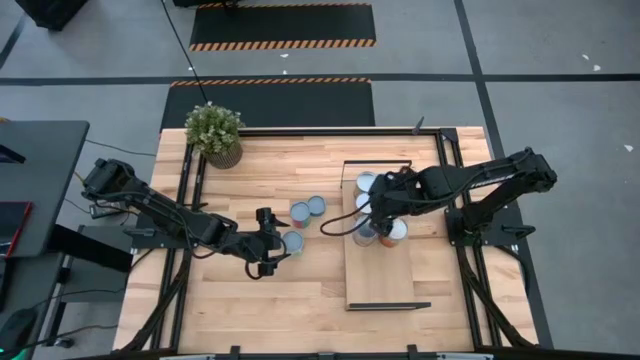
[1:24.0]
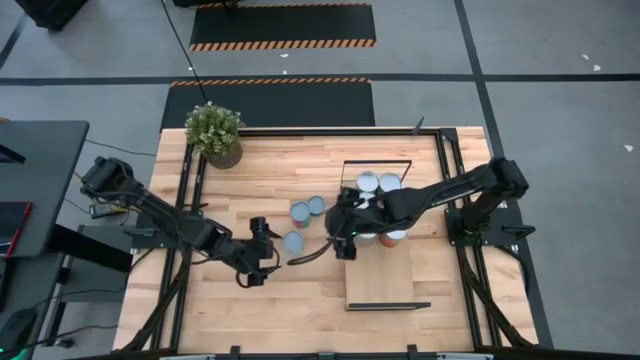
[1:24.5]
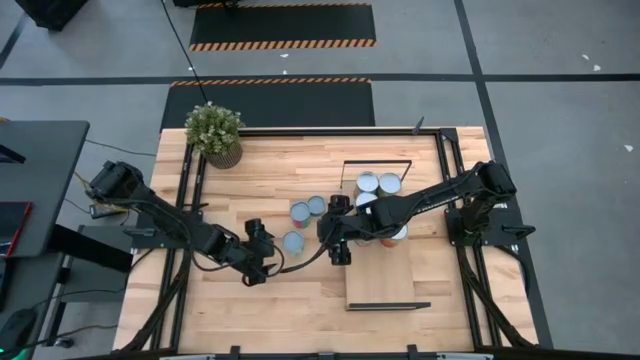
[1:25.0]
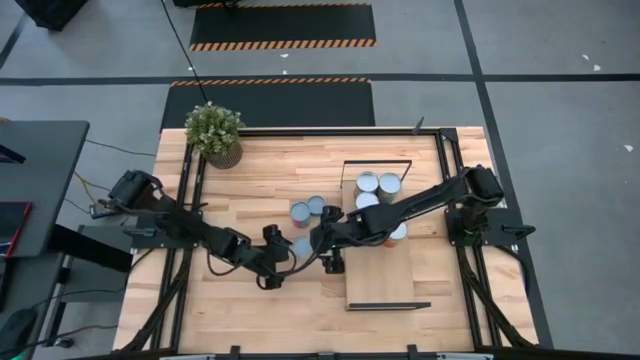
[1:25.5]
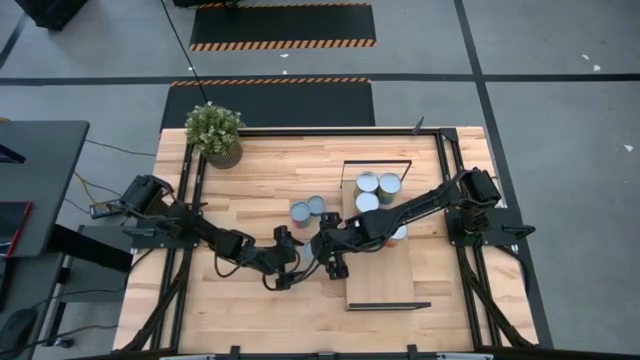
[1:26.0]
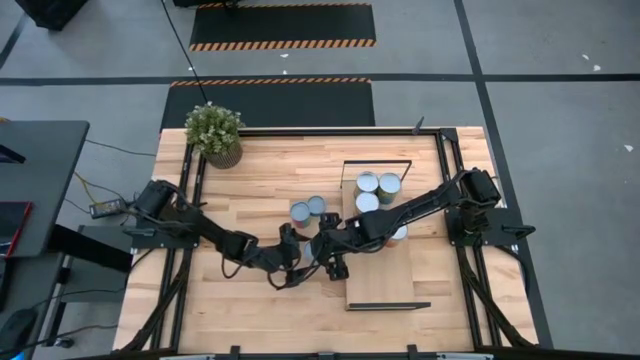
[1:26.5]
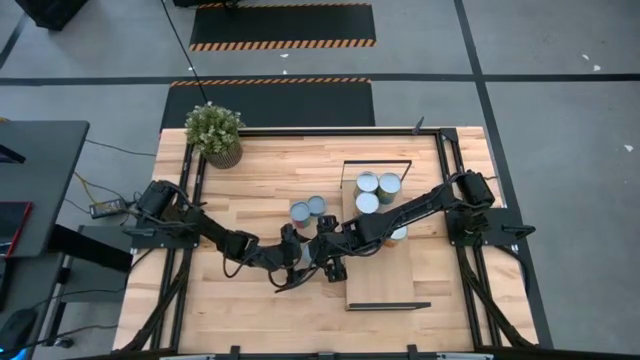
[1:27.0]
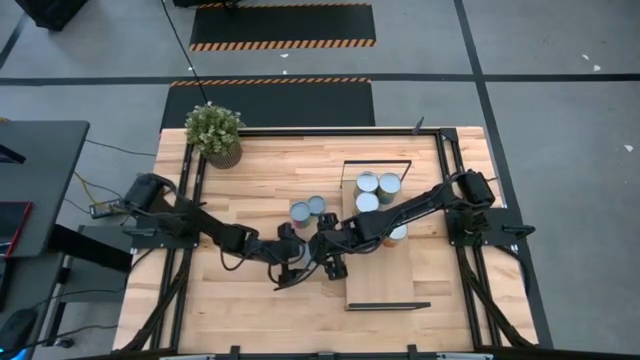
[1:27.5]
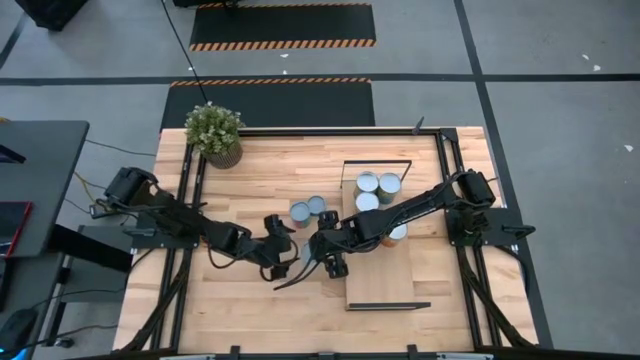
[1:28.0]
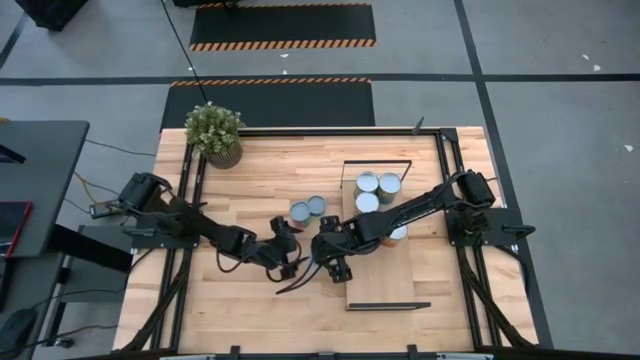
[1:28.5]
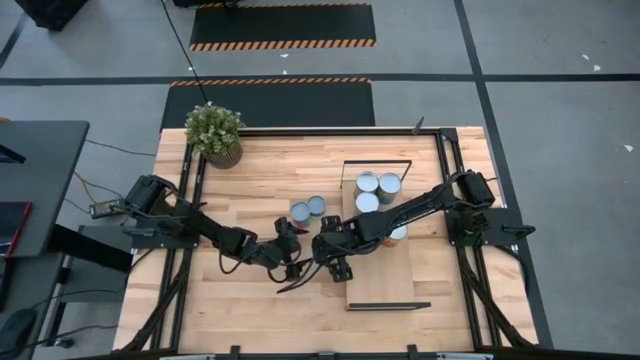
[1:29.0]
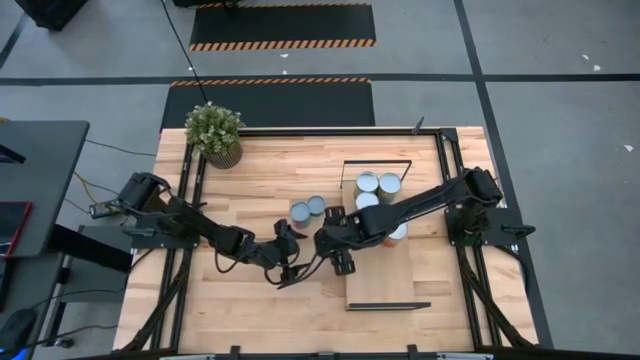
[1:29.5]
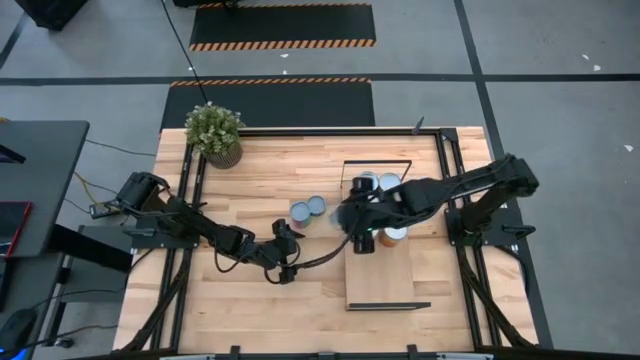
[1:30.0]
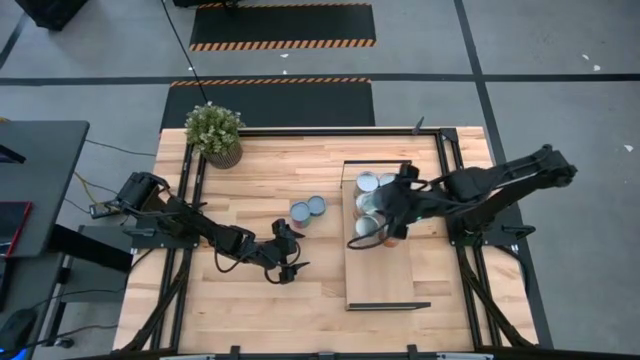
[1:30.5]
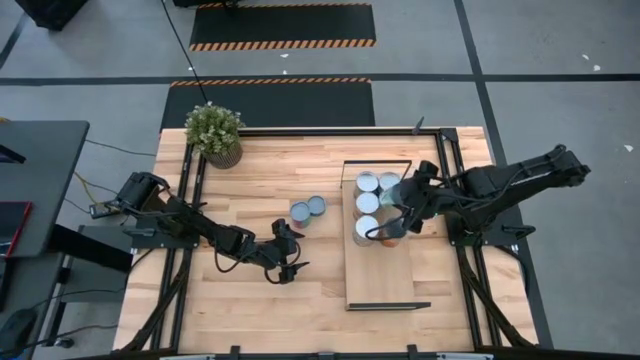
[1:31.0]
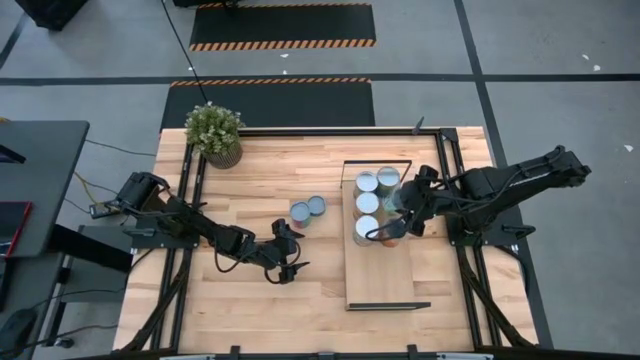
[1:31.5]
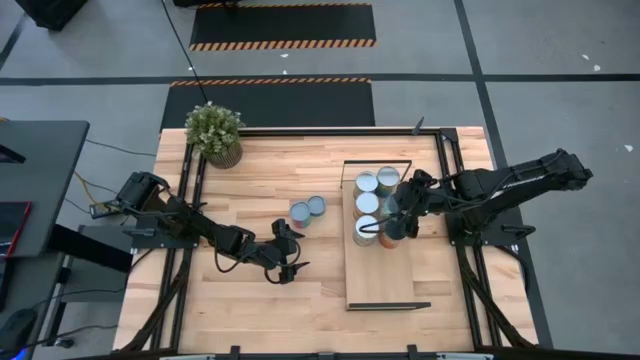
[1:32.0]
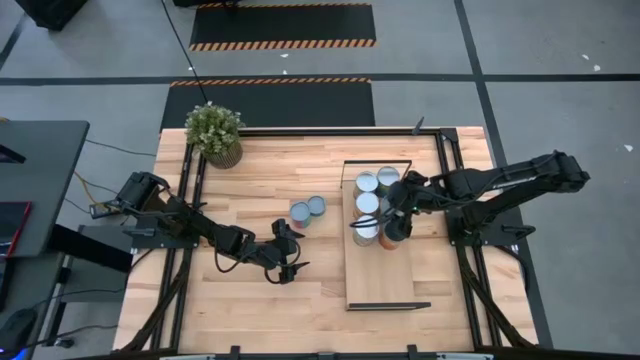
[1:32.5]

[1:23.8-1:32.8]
Task: Pick and place cans onto a shelf
Put the canned mixed fruits on the shelf

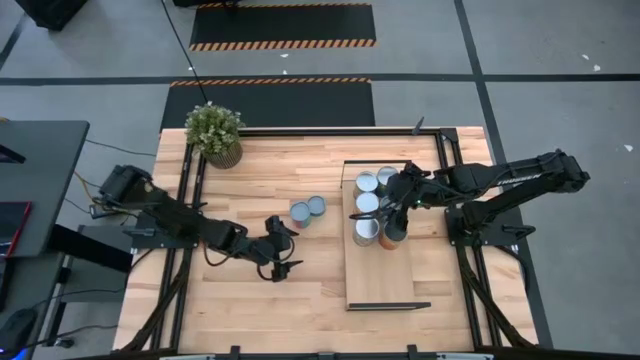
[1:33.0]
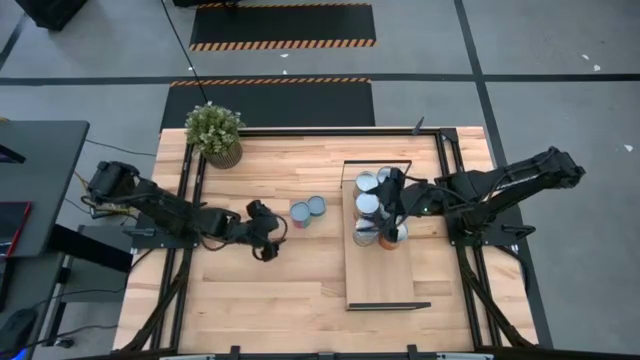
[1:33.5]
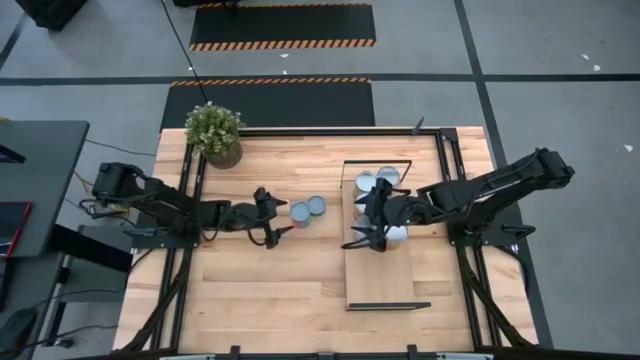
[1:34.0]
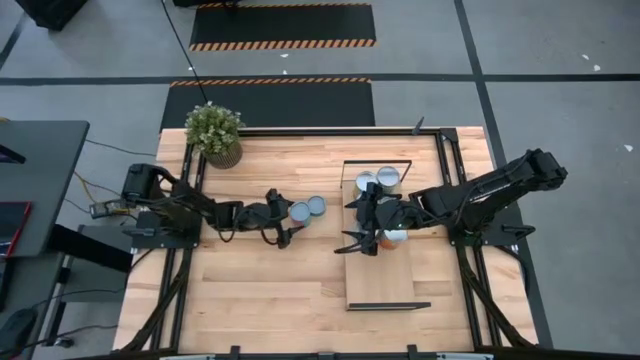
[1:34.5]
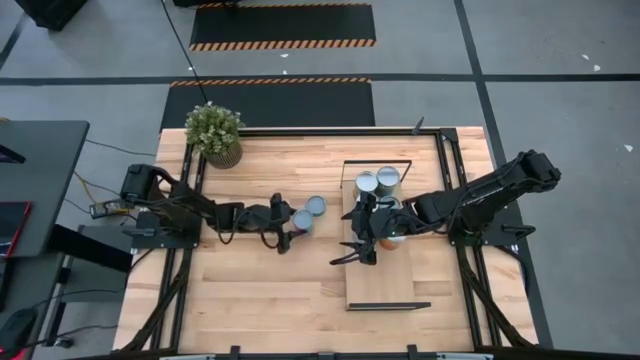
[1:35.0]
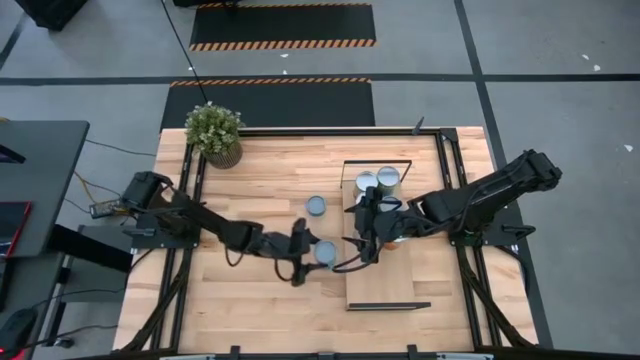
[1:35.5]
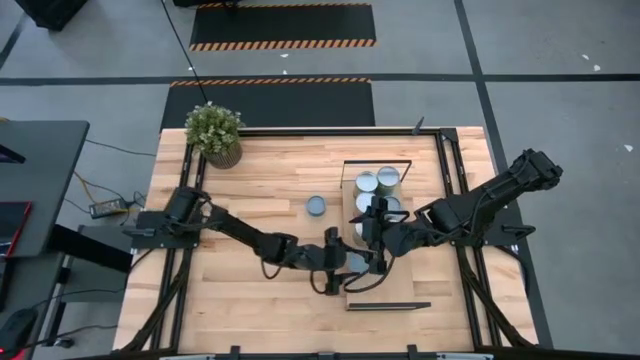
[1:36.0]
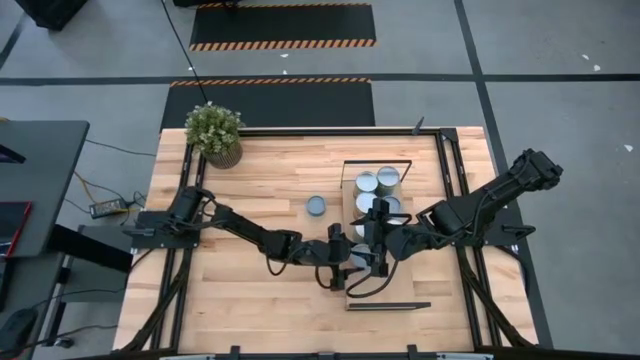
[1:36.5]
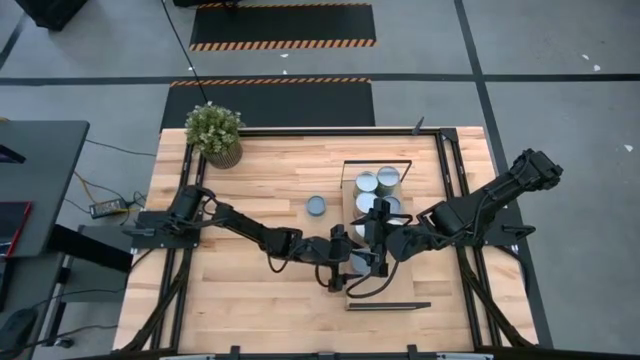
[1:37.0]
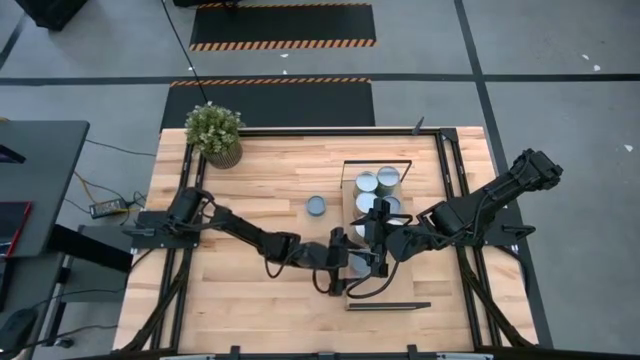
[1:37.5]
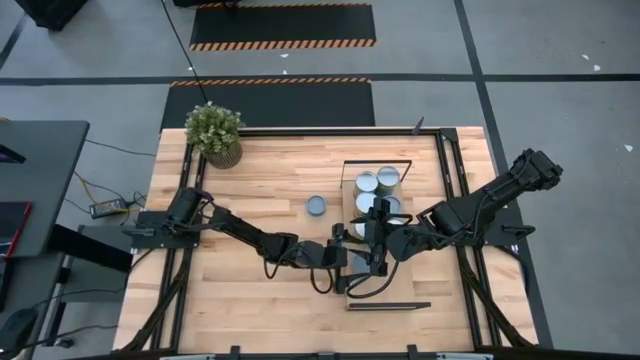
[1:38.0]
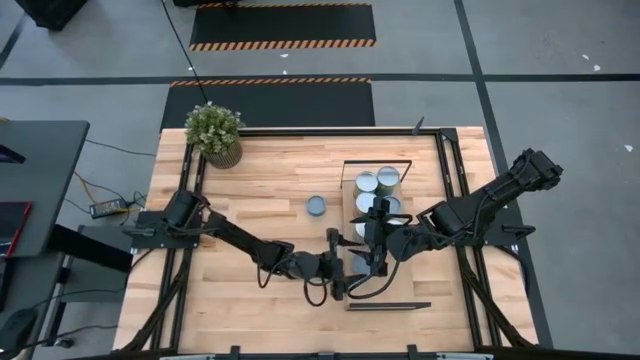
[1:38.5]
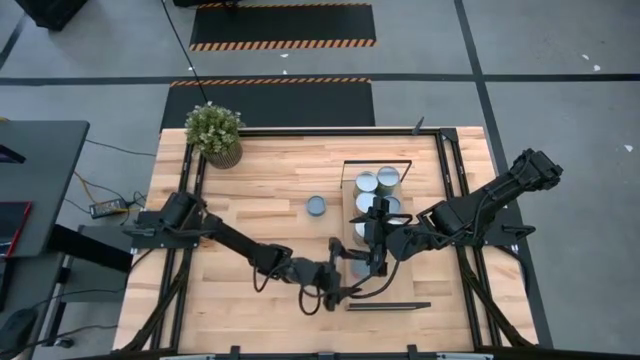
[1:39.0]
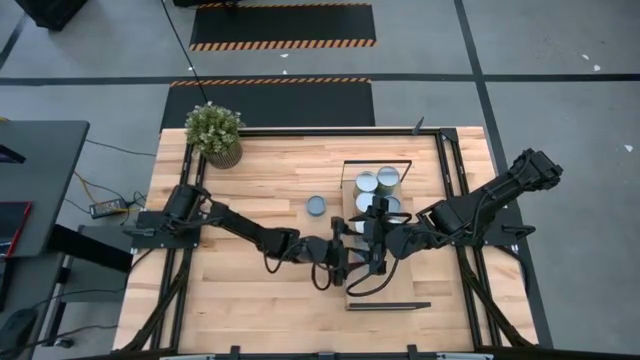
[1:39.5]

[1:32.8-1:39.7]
Put the canned chicken soup on the shelf

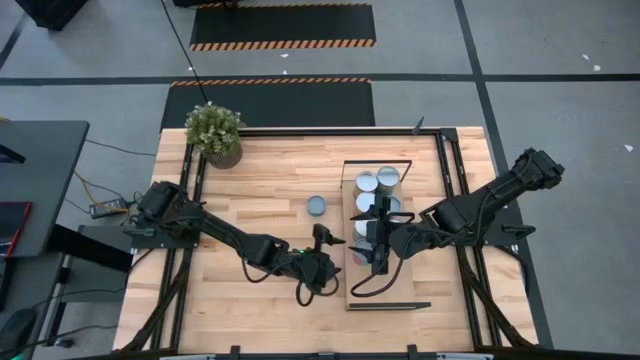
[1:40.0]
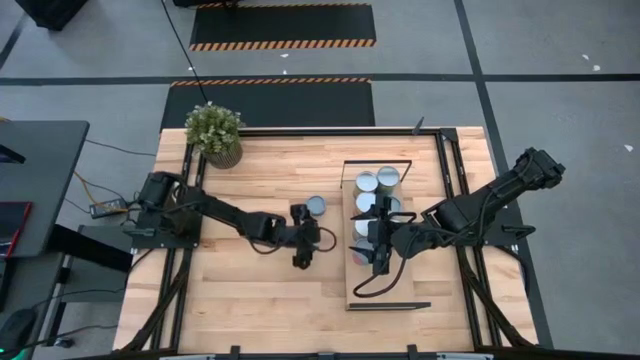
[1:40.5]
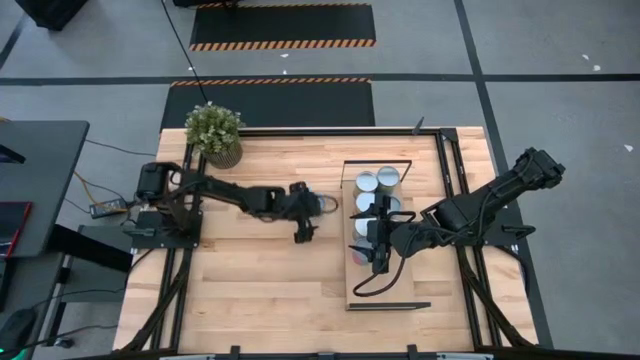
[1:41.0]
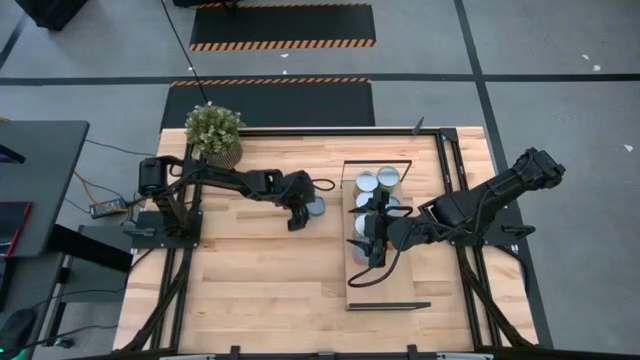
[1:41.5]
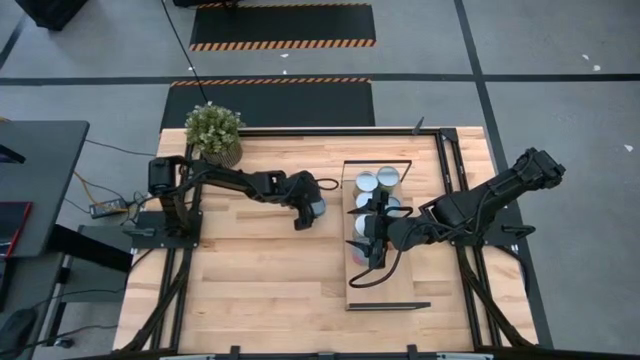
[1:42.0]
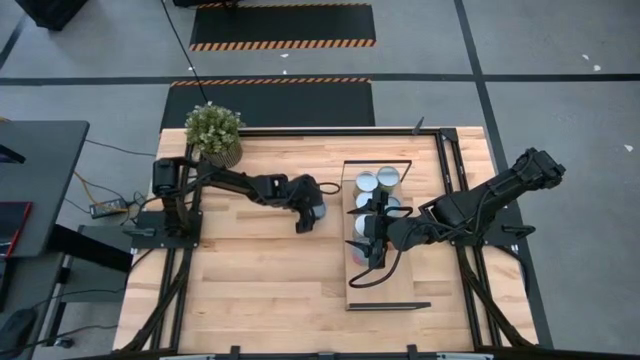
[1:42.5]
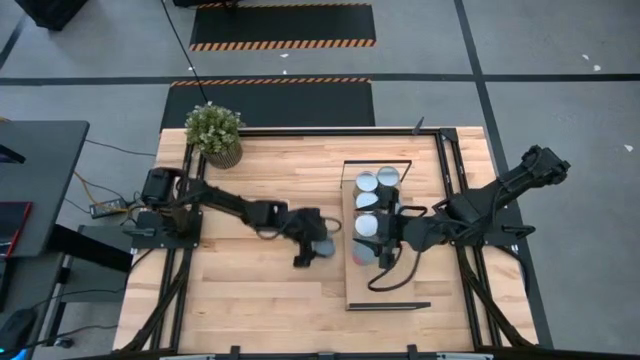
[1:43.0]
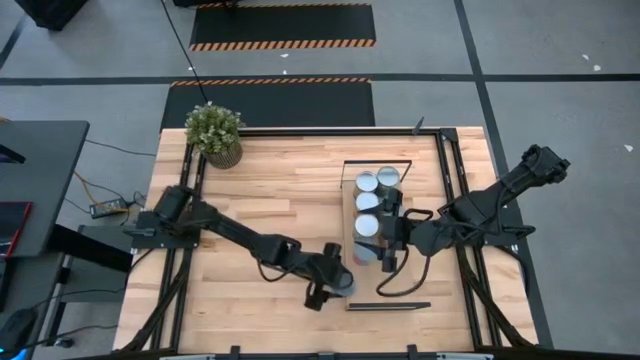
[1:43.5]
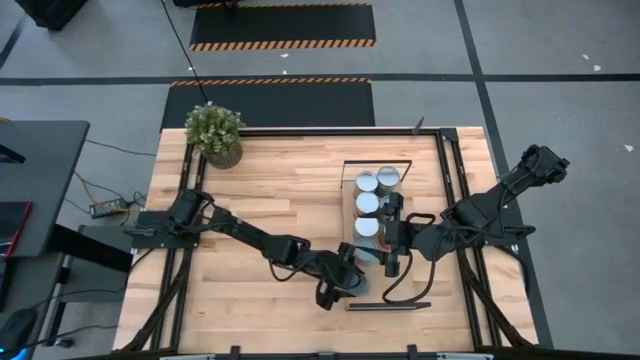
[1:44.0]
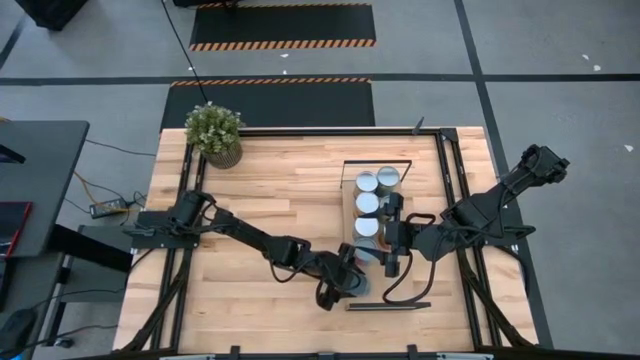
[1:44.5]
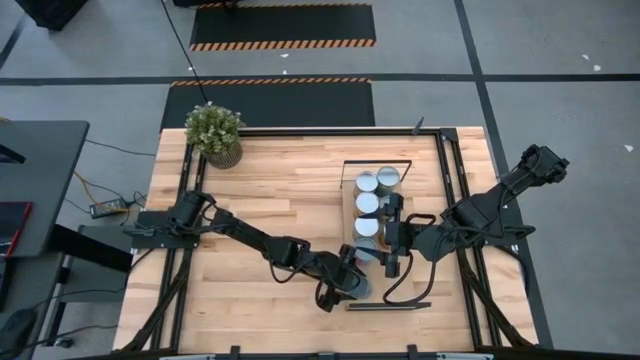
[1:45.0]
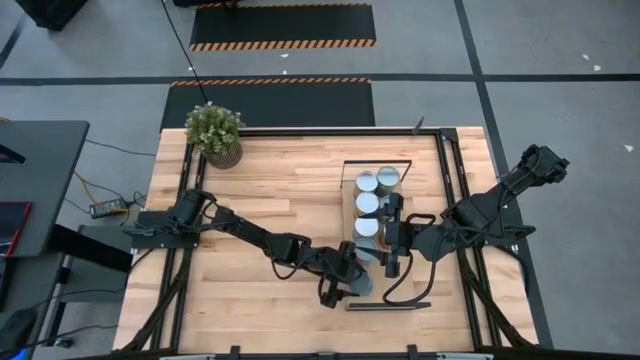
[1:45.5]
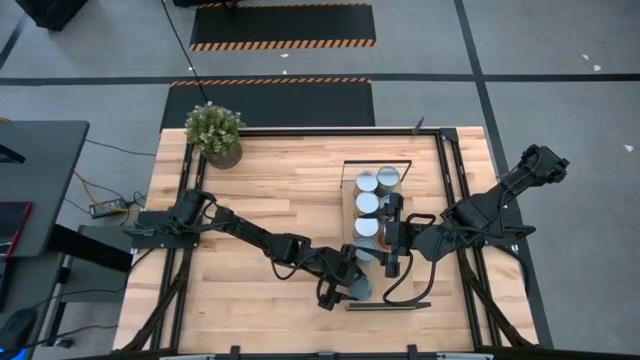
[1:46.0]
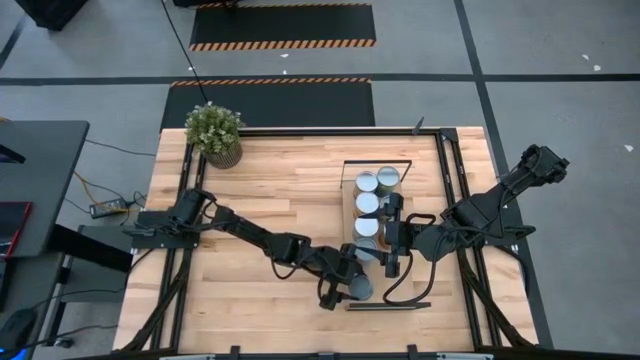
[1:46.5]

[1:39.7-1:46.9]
Put the canned tuna on the shelf
